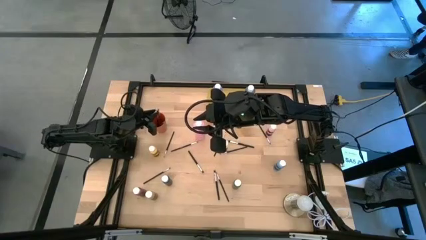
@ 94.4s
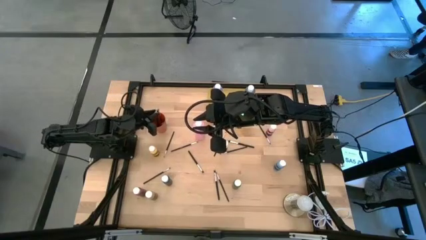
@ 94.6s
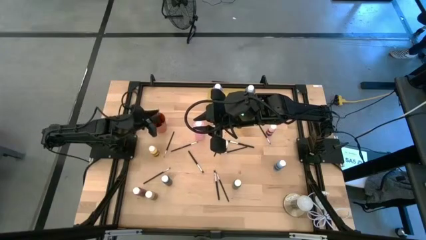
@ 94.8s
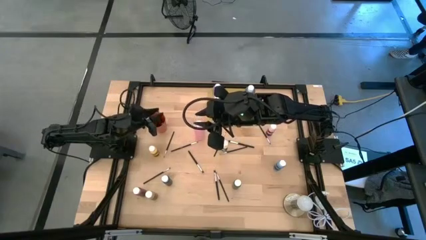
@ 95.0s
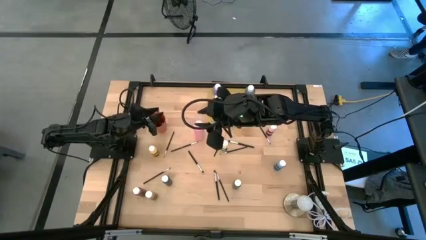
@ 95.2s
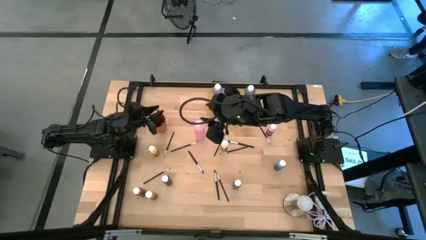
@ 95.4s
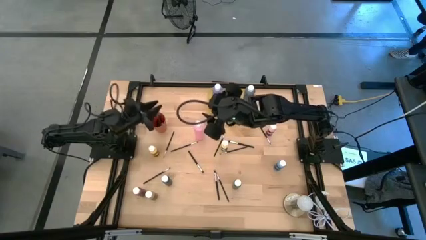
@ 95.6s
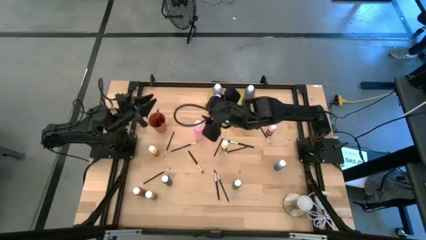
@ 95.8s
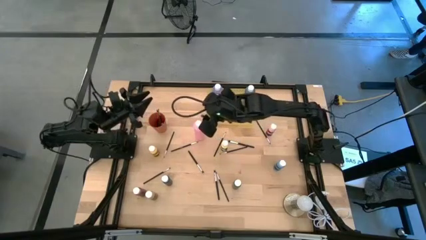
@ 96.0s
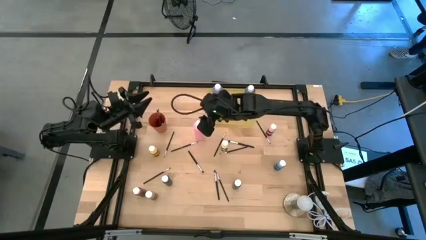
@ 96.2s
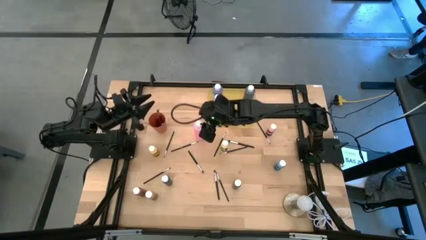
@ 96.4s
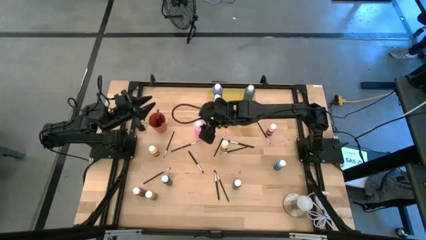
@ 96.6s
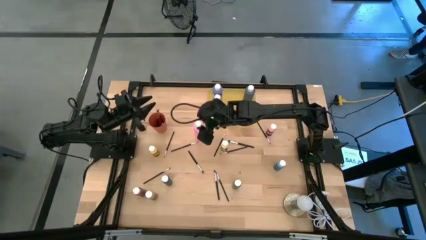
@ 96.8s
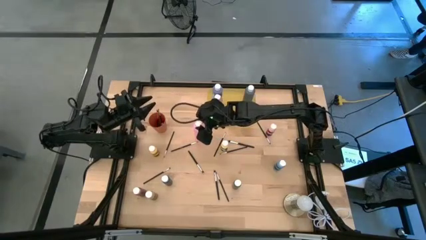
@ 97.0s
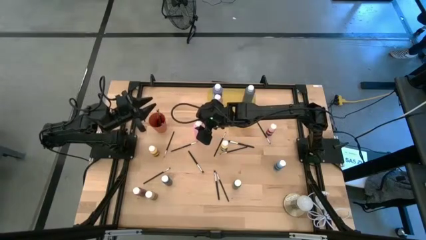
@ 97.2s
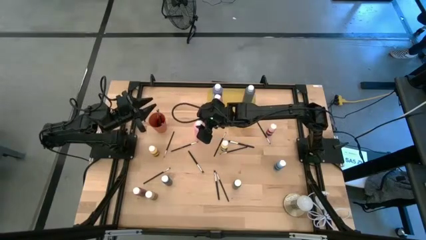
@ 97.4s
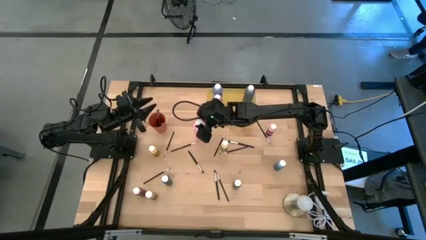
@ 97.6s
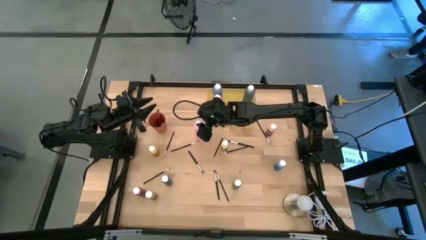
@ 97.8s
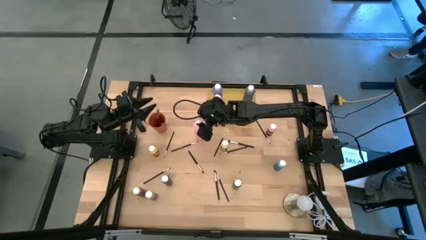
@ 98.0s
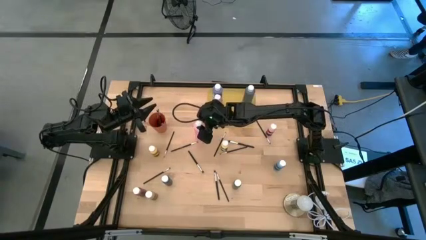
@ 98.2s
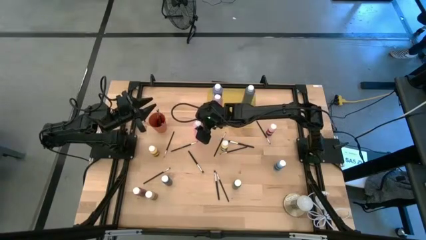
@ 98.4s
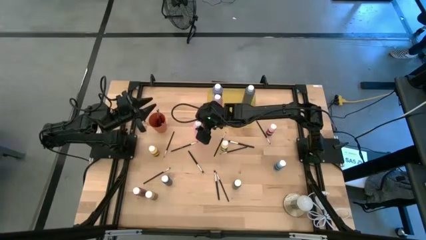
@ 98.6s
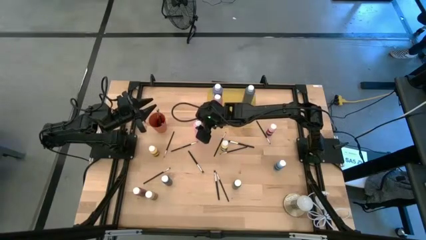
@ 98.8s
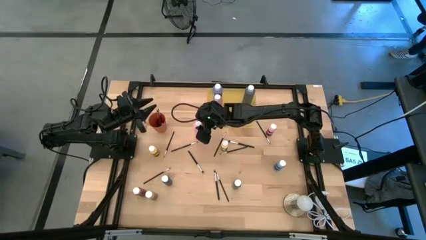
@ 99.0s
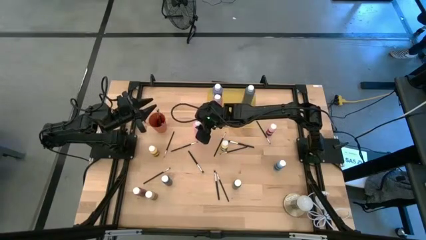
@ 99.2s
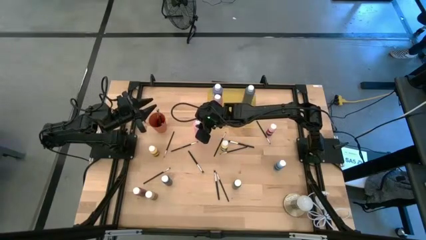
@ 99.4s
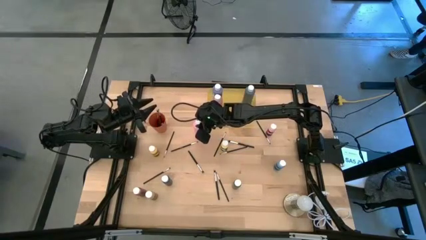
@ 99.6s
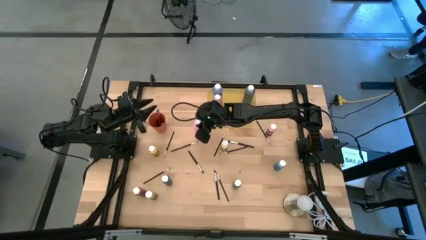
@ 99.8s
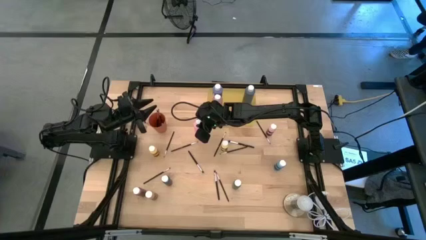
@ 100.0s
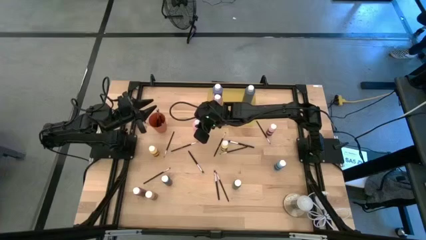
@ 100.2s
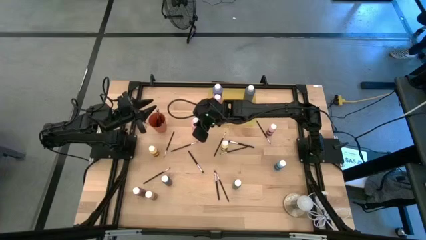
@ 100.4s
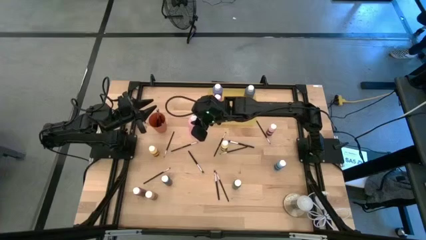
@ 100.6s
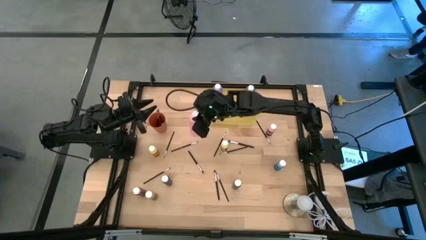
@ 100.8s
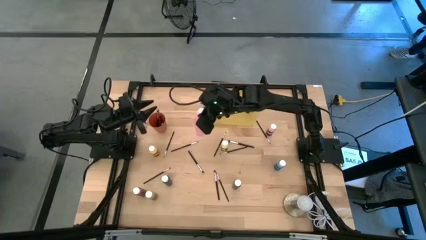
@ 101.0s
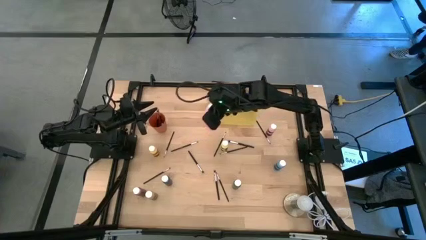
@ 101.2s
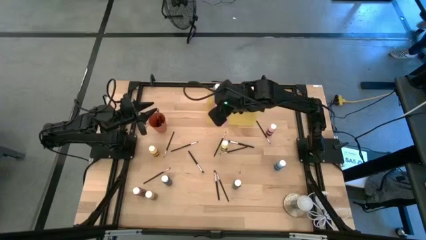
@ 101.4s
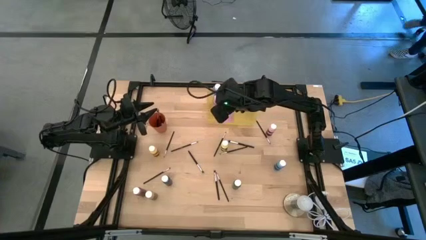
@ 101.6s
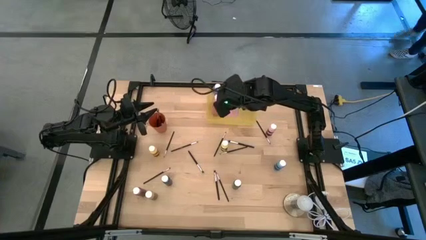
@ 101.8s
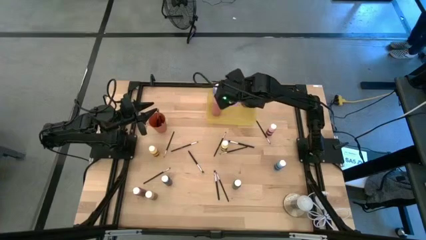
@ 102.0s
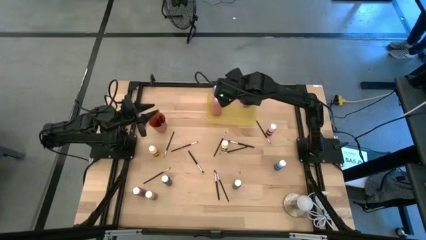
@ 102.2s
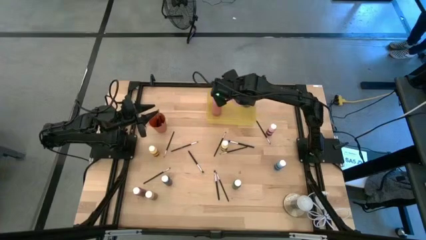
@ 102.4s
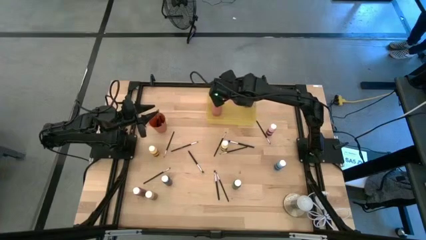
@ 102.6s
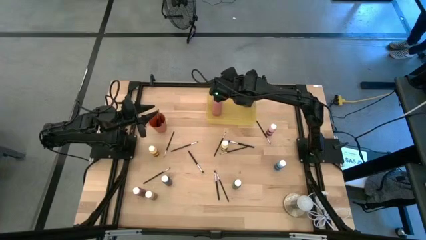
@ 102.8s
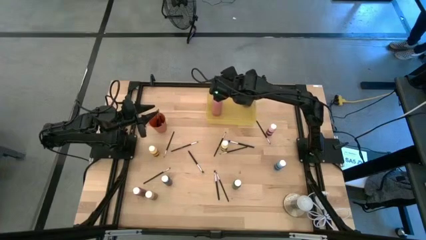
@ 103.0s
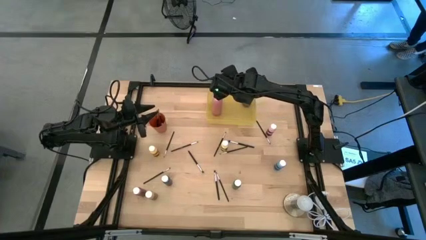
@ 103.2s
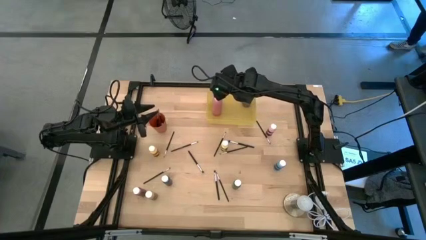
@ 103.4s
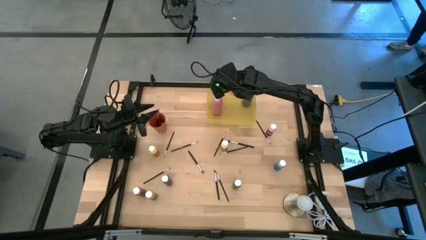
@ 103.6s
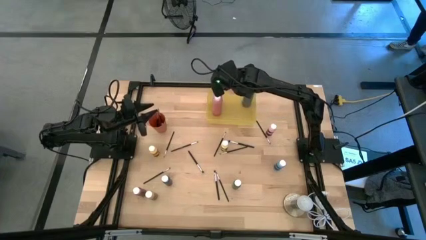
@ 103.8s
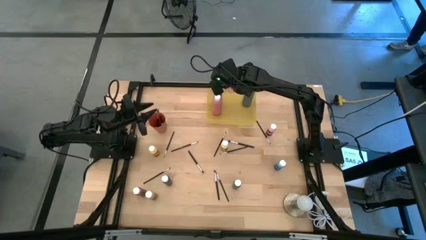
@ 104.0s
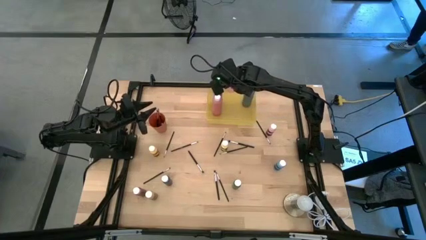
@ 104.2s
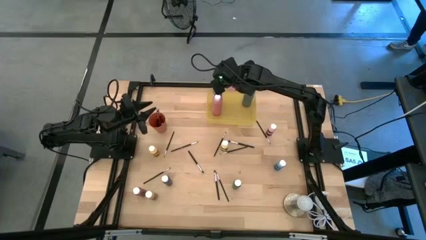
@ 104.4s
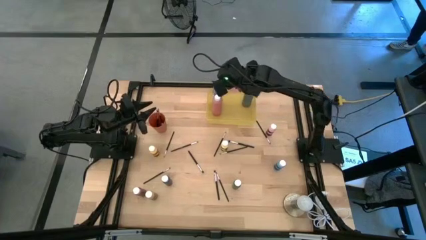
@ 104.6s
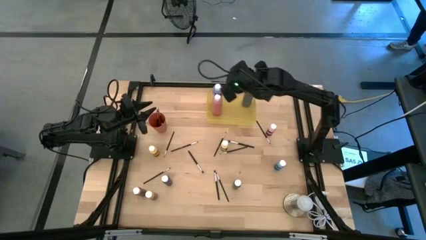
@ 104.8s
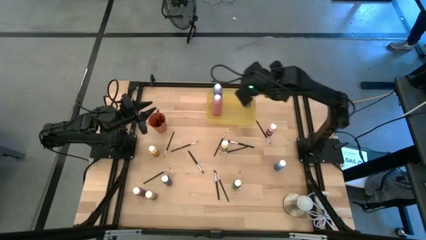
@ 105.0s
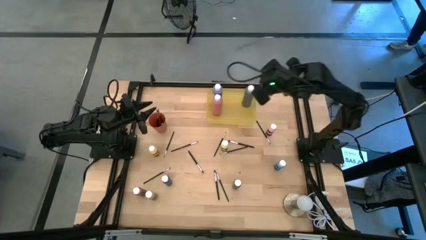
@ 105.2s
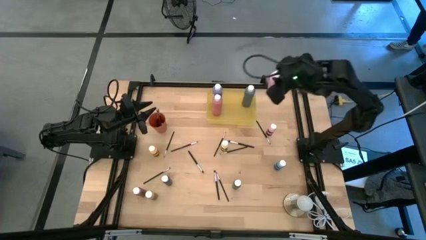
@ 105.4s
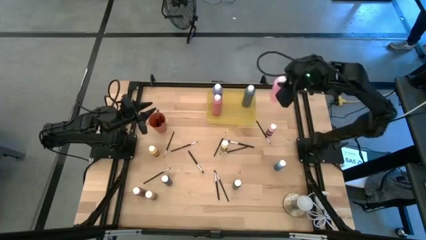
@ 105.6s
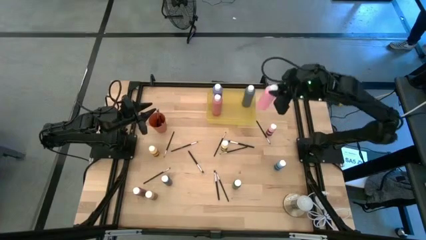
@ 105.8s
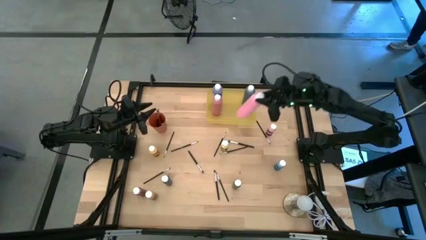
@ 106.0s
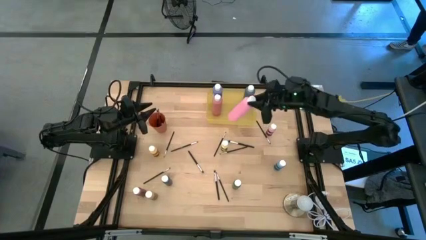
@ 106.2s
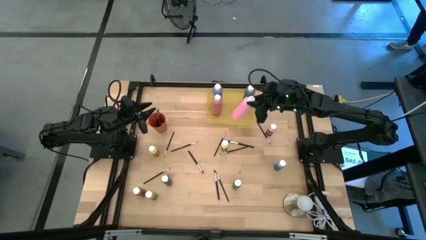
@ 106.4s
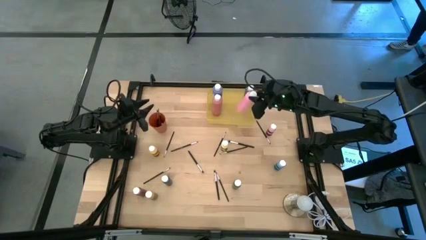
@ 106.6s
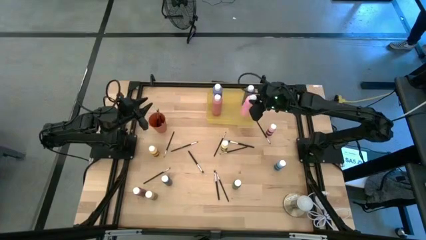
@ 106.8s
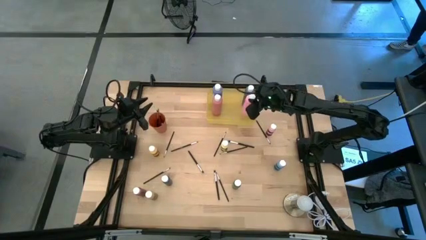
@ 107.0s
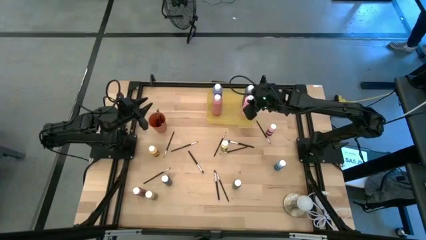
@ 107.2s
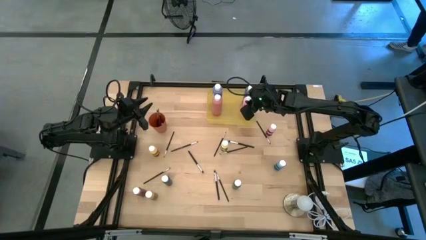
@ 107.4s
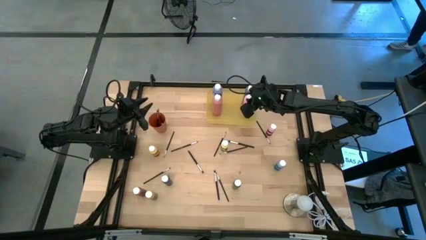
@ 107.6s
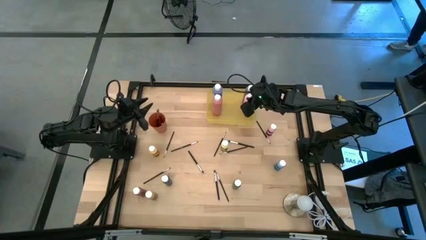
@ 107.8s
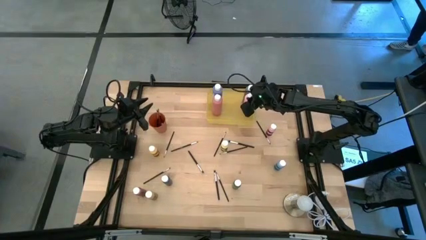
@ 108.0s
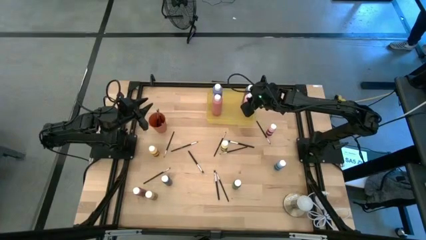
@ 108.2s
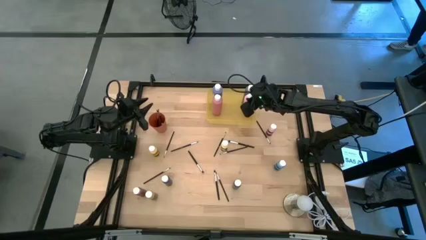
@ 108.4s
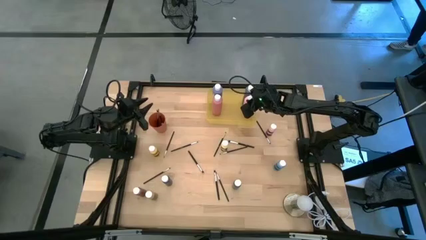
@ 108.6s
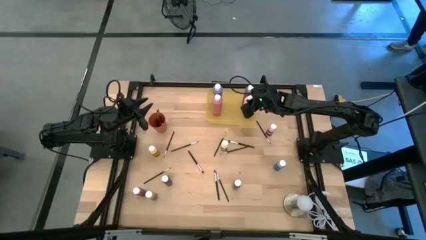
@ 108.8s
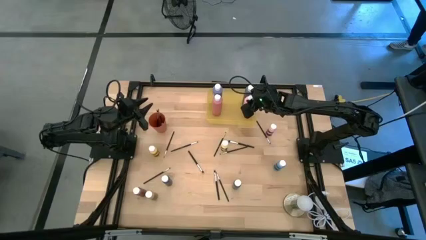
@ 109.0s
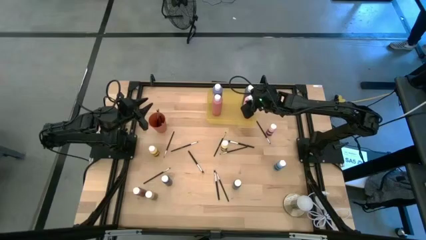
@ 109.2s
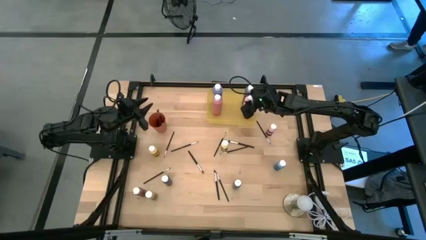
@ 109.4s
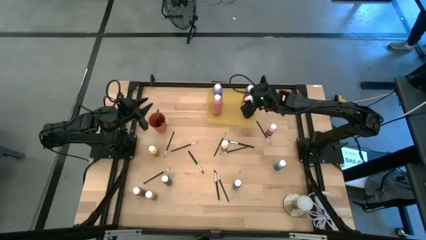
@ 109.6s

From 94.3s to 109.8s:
Task: Pick & Place Paint Supplies
Put the large pink paint bottle into the yellow bin

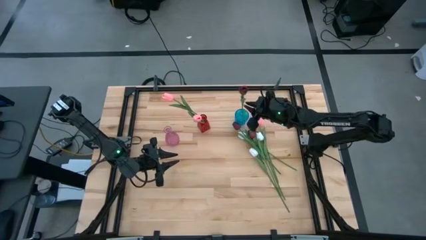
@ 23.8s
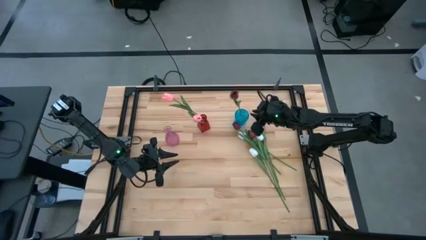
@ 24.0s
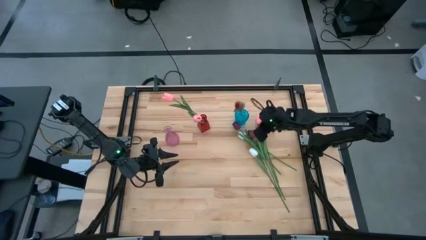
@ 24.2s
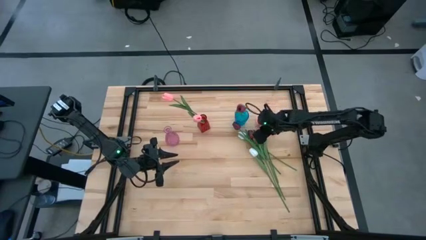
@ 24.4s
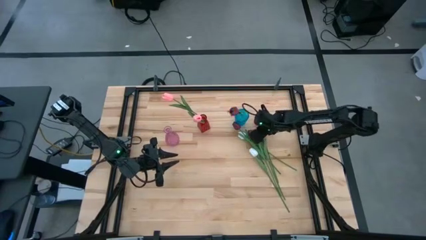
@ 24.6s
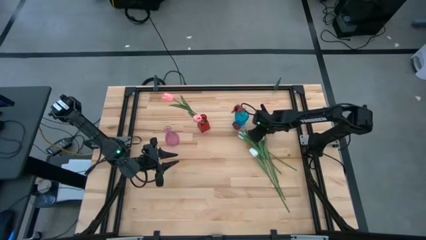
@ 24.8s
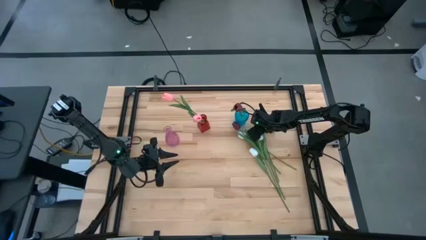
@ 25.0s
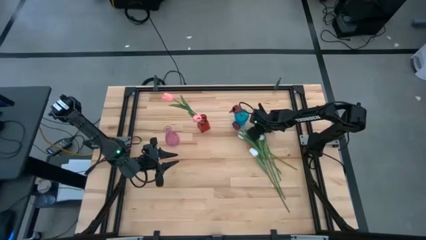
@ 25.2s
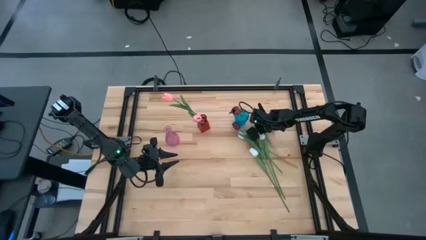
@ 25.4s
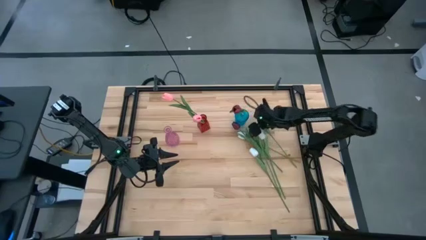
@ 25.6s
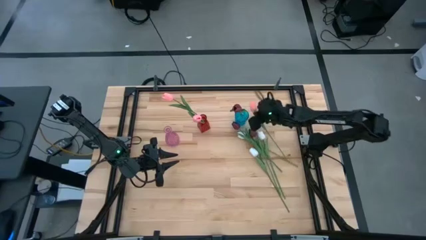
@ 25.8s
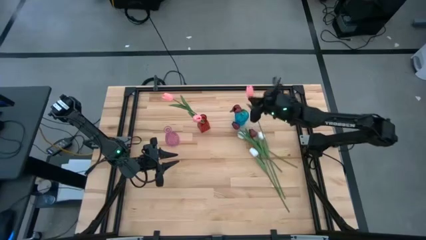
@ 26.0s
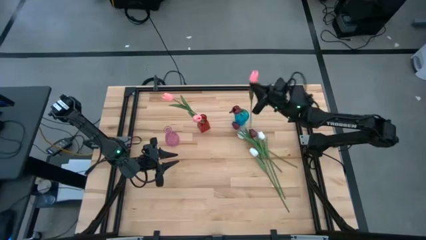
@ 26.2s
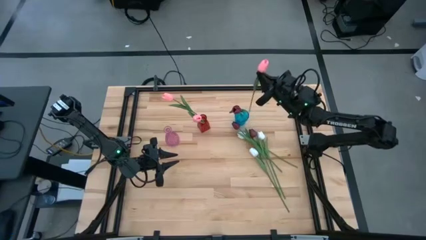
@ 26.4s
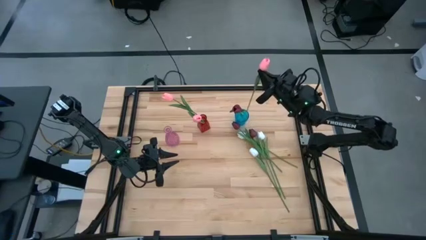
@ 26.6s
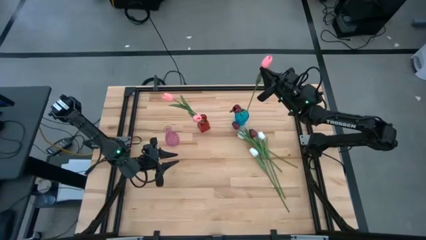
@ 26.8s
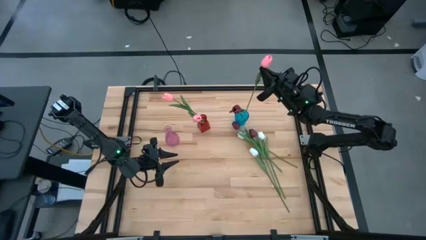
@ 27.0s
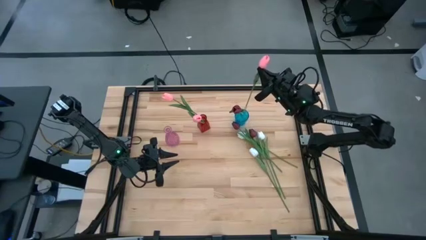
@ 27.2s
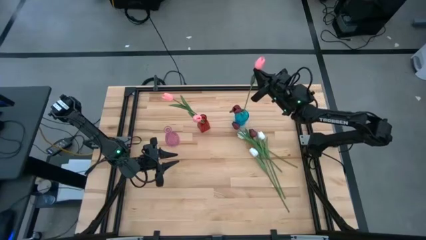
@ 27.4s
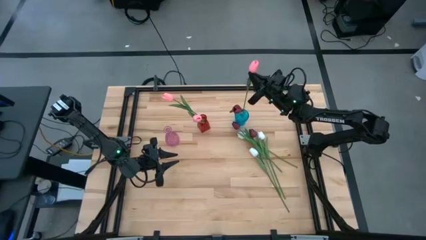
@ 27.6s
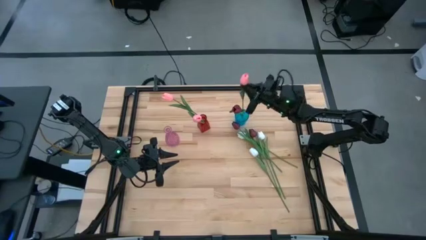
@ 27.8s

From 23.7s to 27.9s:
Task: Sort flowers into vase by color
Put the pink tulip into the blue vase
